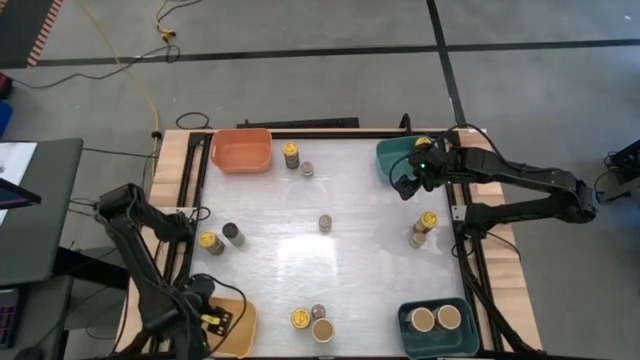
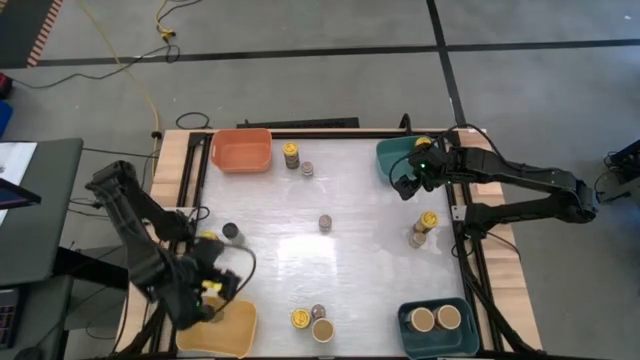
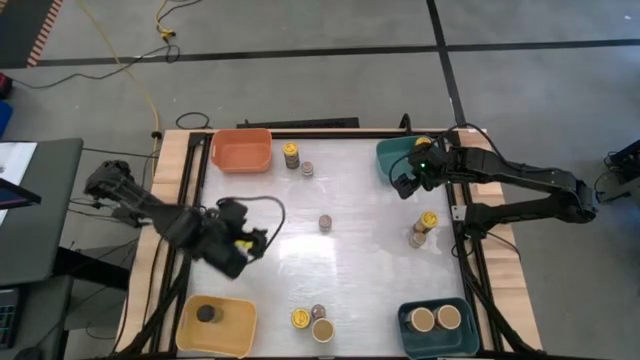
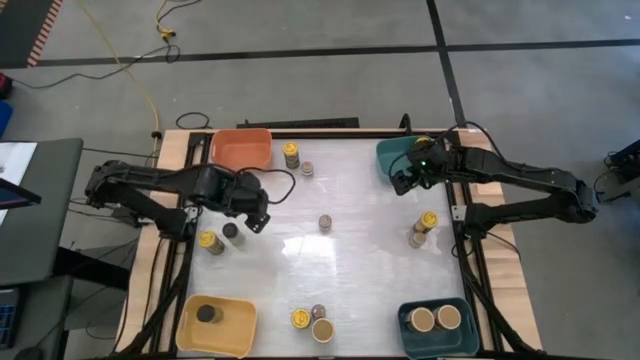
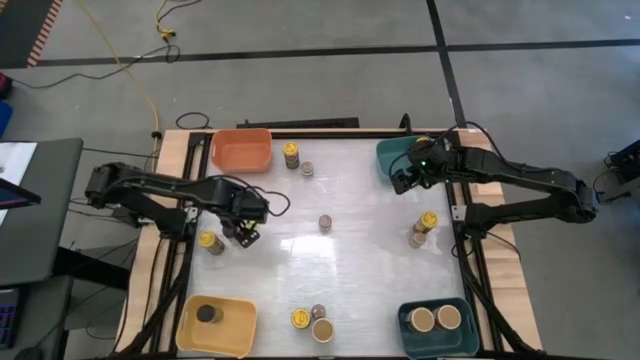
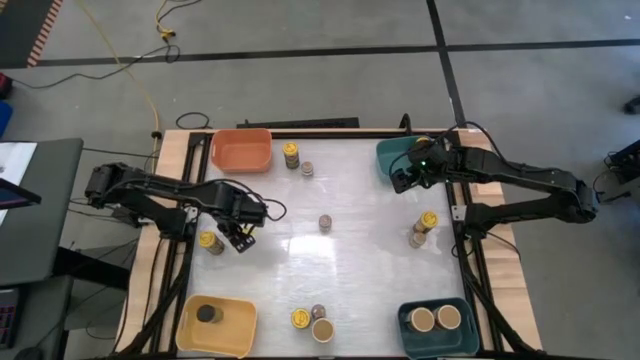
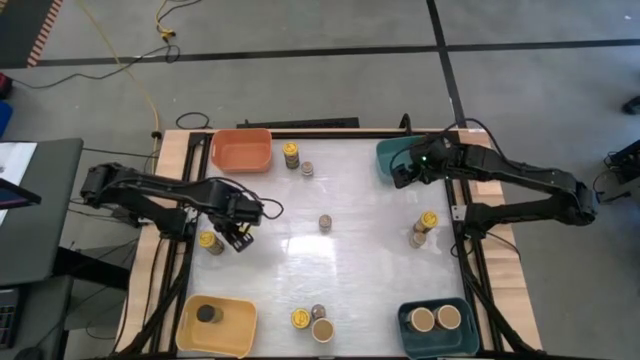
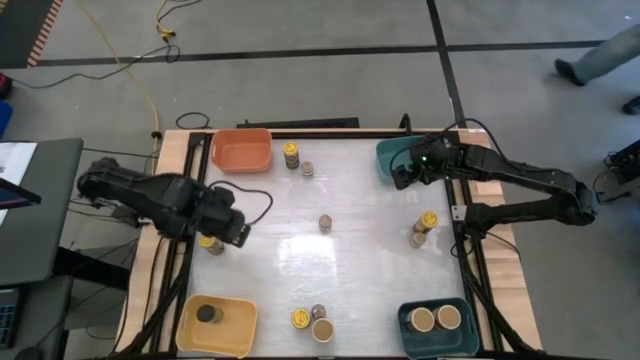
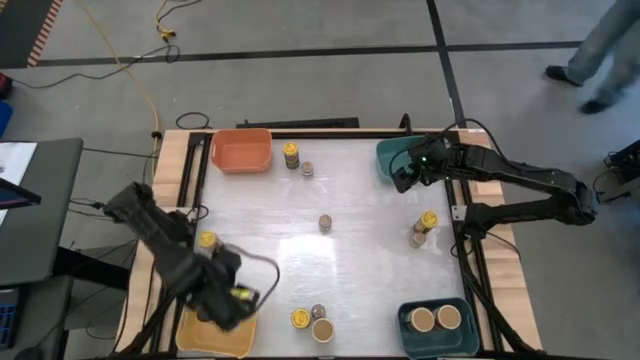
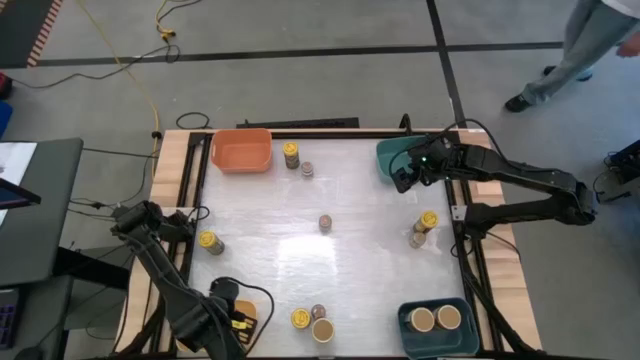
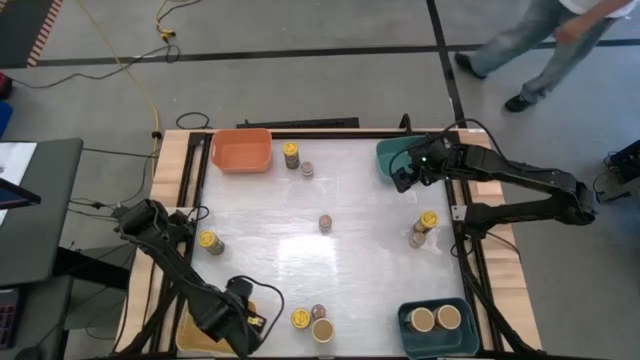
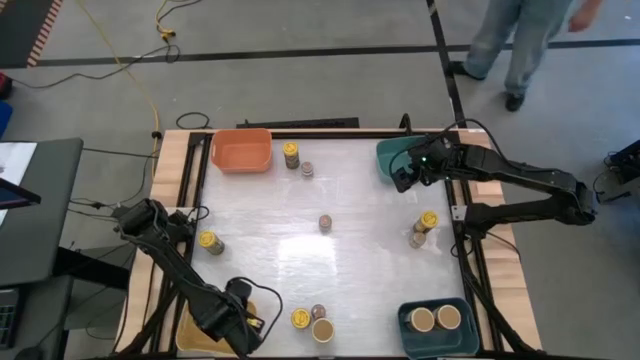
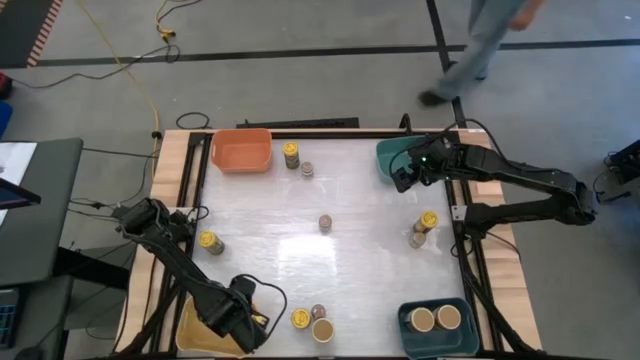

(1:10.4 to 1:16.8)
Task: Sort spices by type
Put the black seasoning bottle into the yellow bin

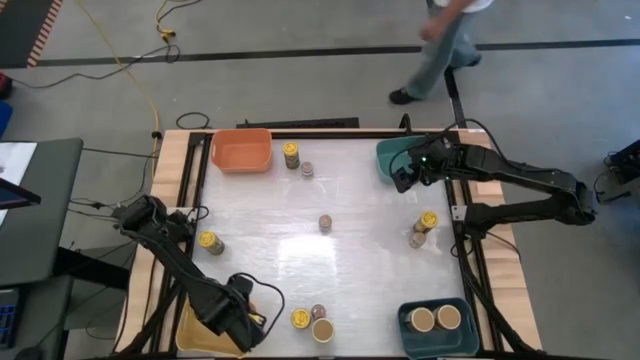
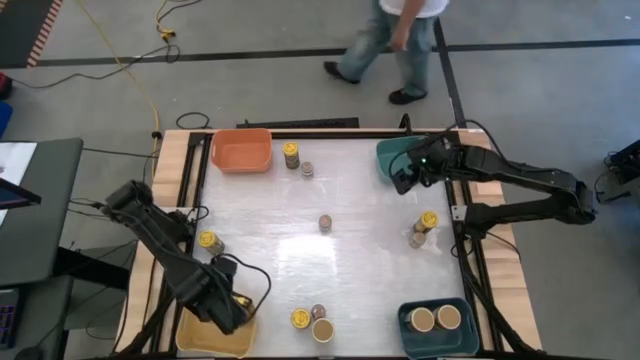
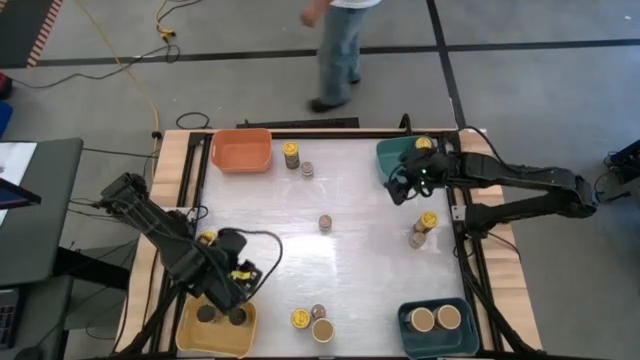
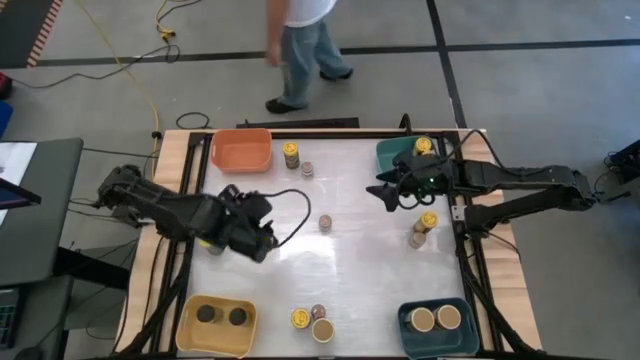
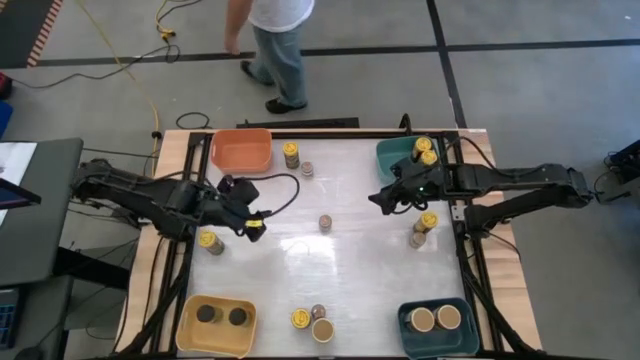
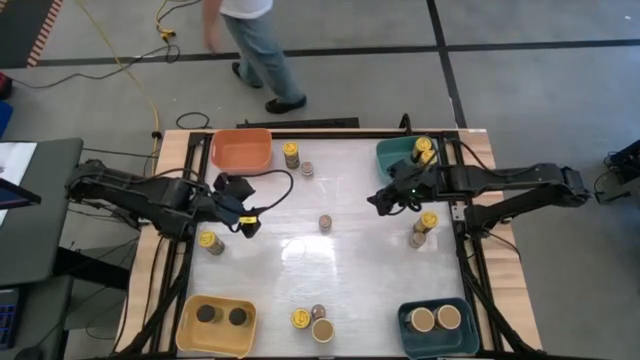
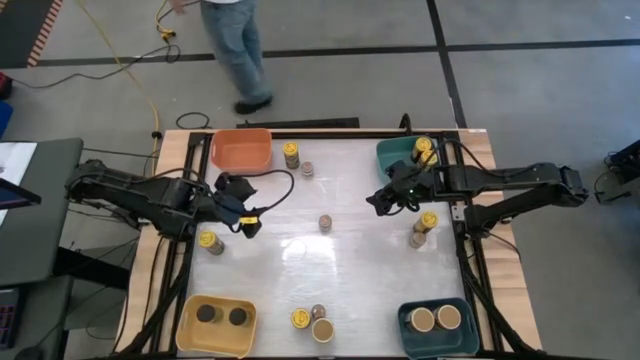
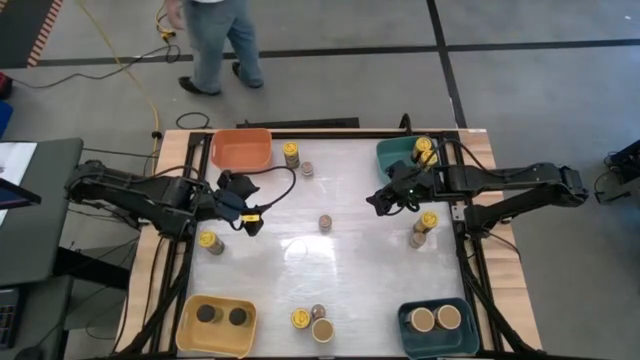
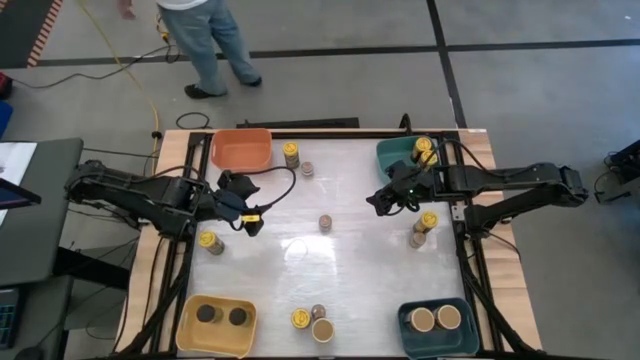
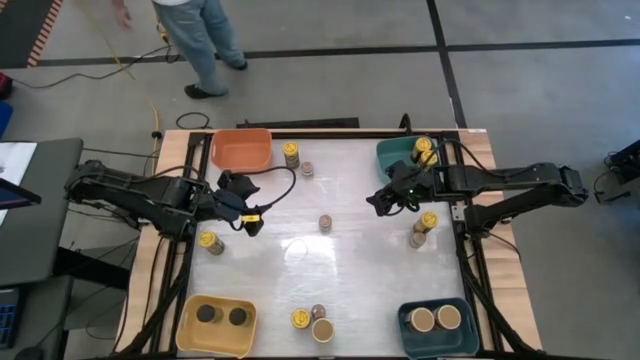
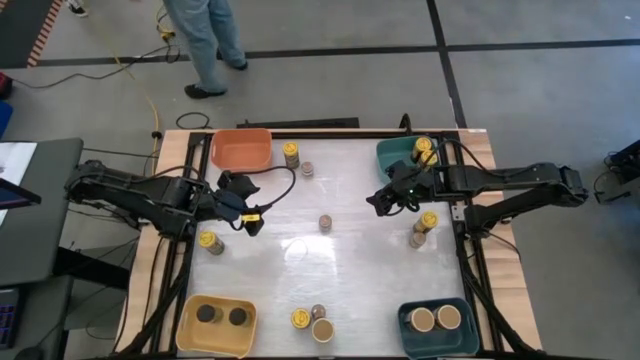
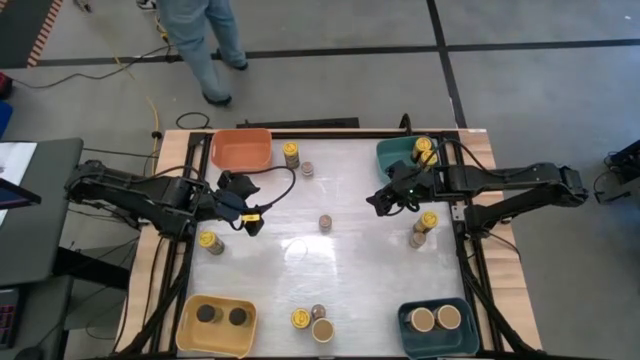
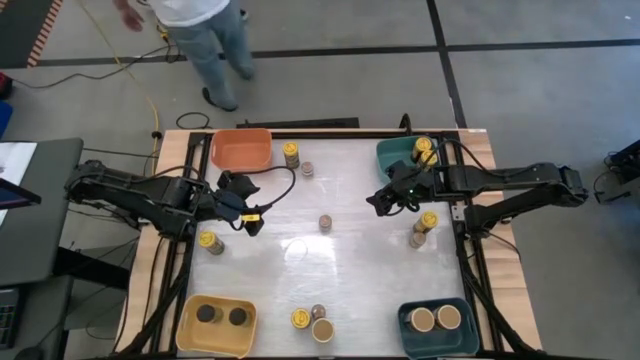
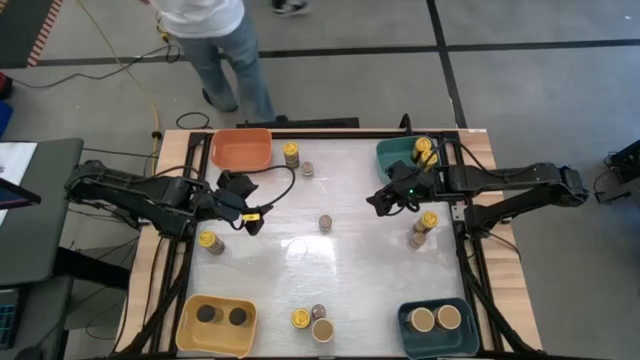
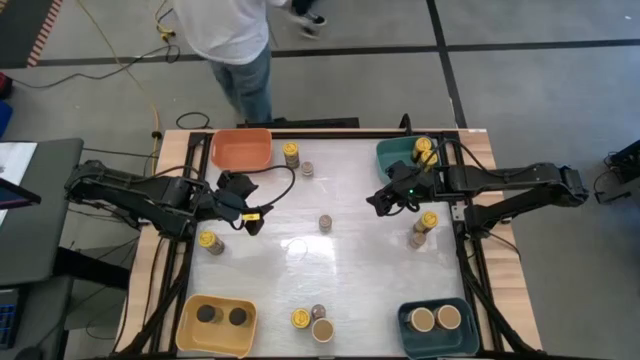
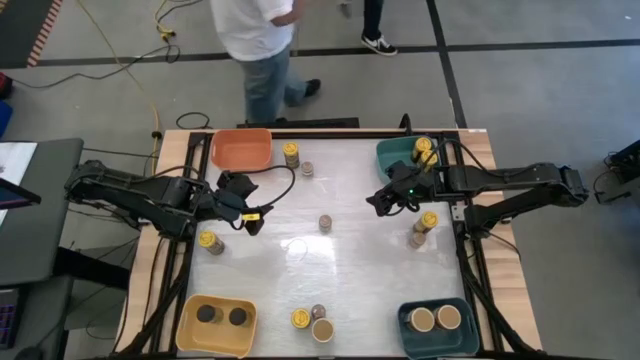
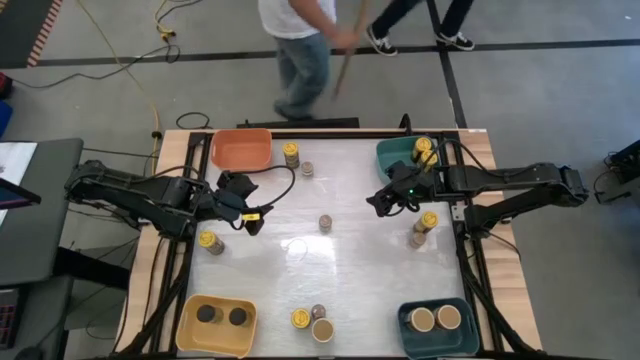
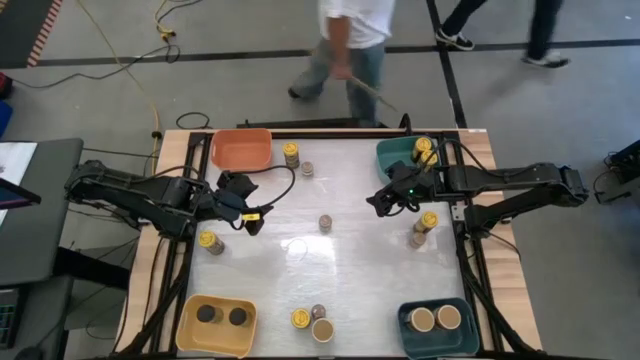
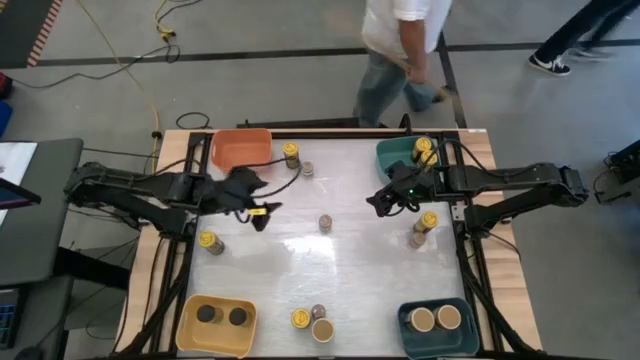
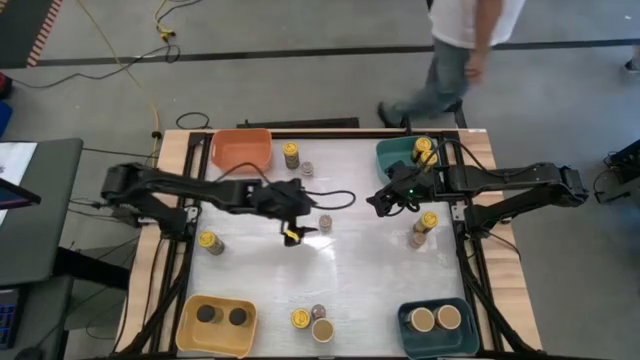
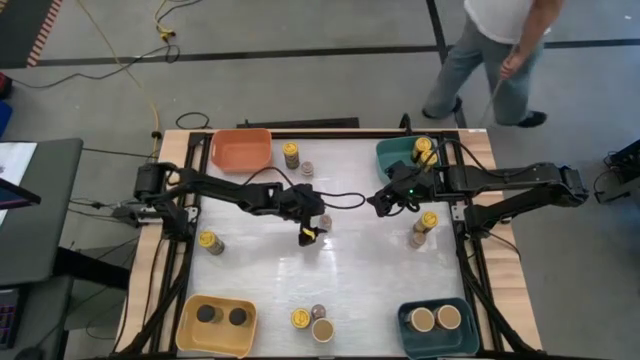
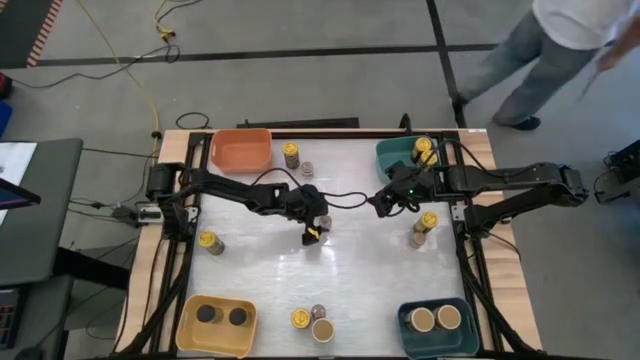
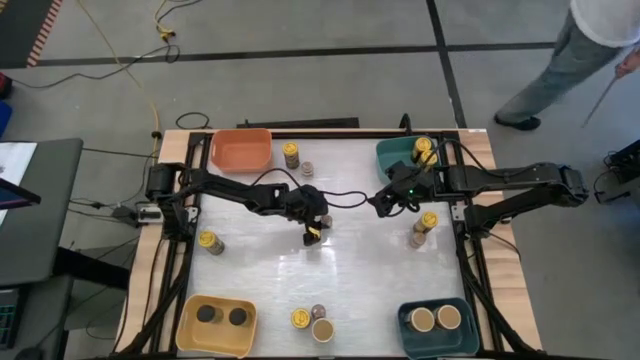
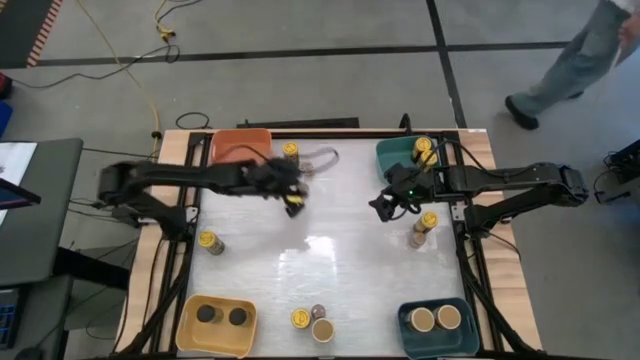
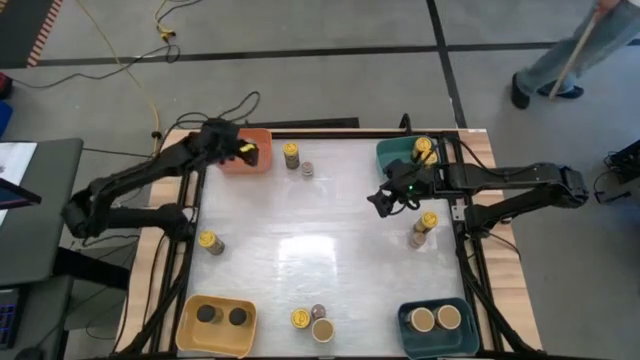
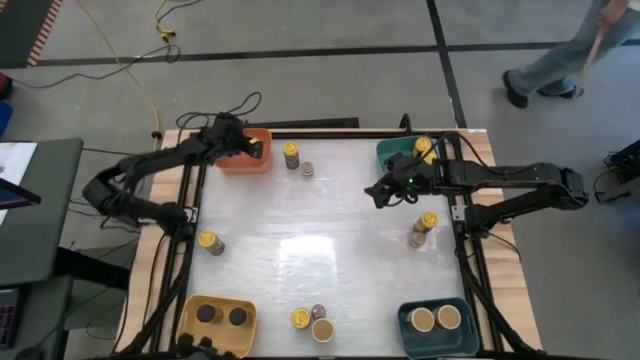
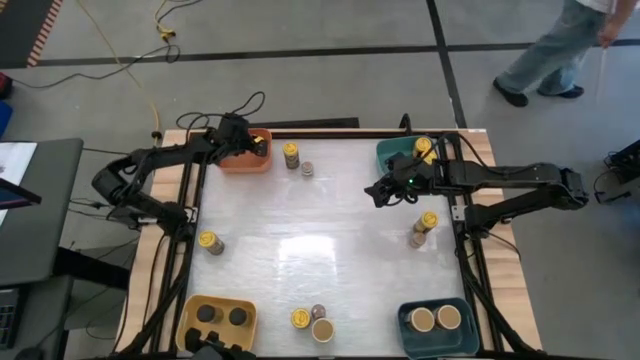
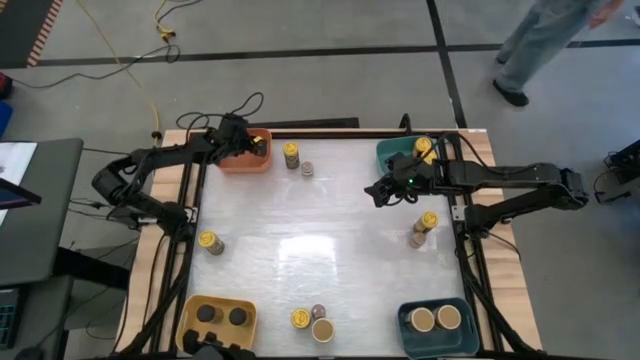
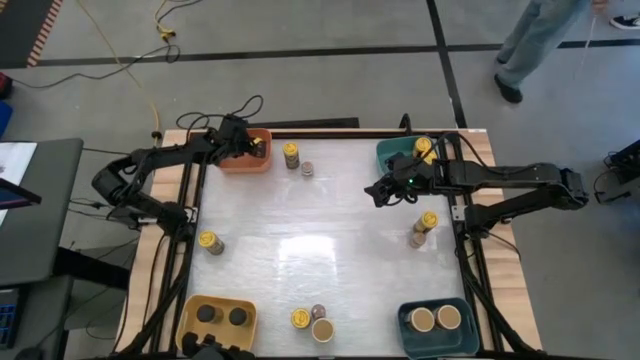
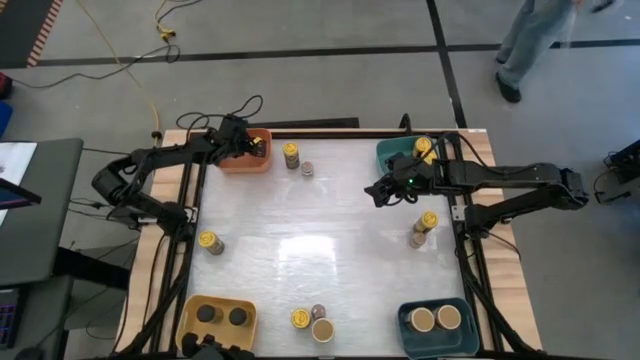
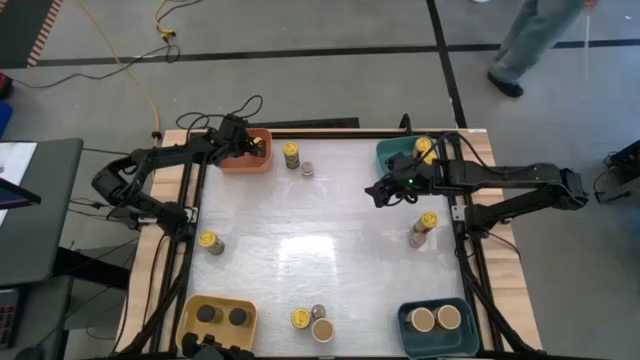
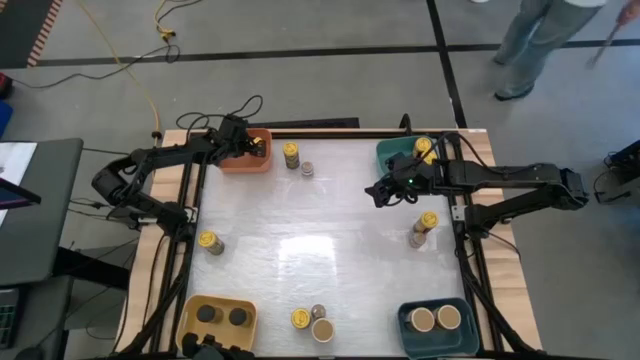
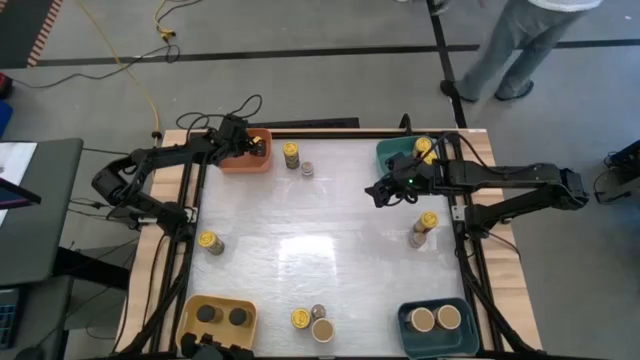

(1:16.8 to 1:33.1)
Put the center brown small seasoning bottle into the orange bin
